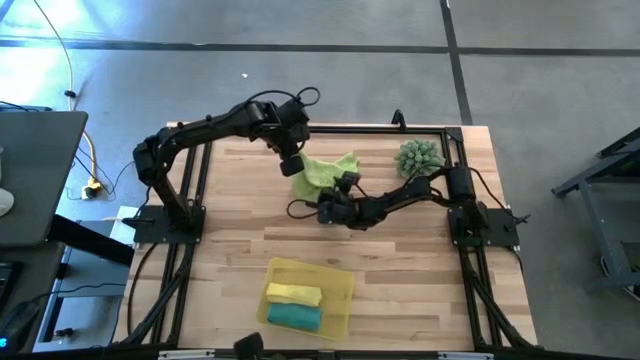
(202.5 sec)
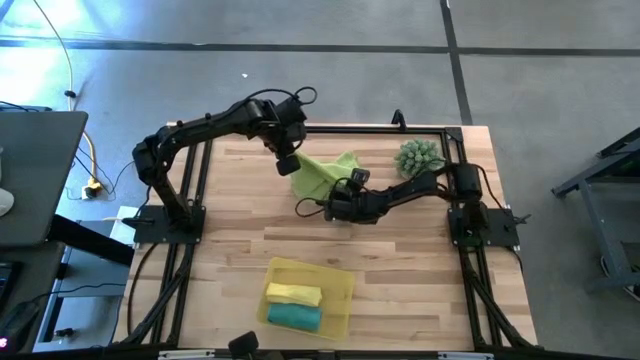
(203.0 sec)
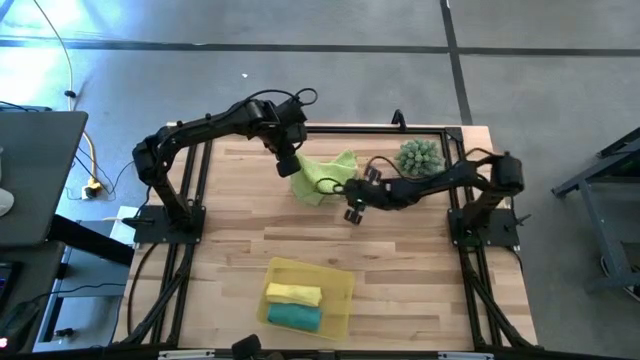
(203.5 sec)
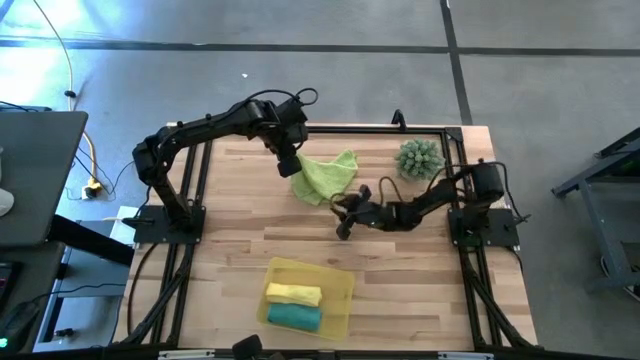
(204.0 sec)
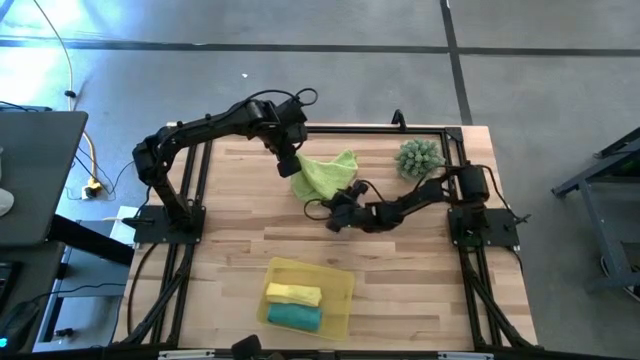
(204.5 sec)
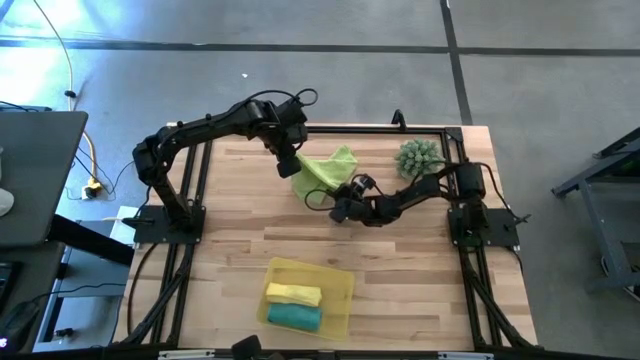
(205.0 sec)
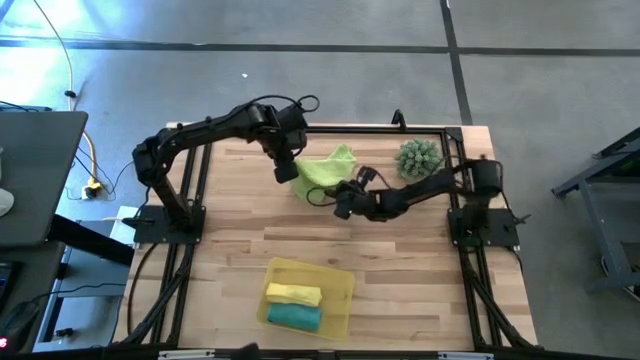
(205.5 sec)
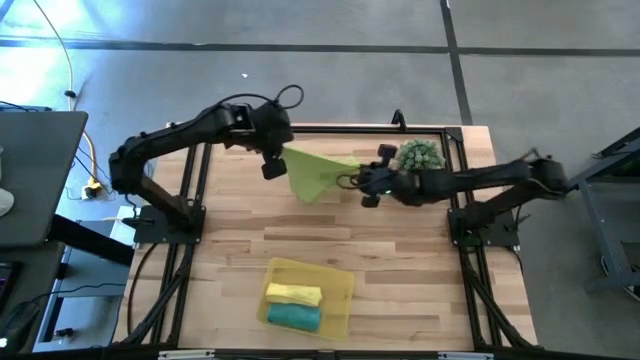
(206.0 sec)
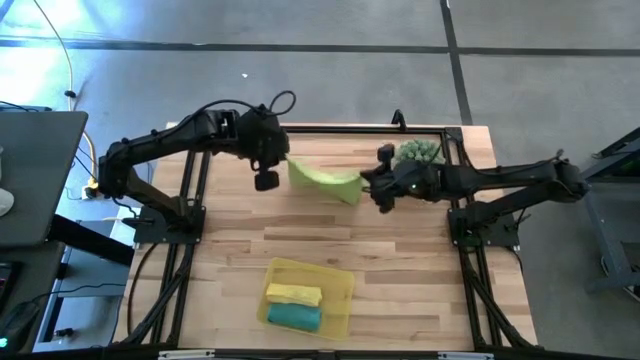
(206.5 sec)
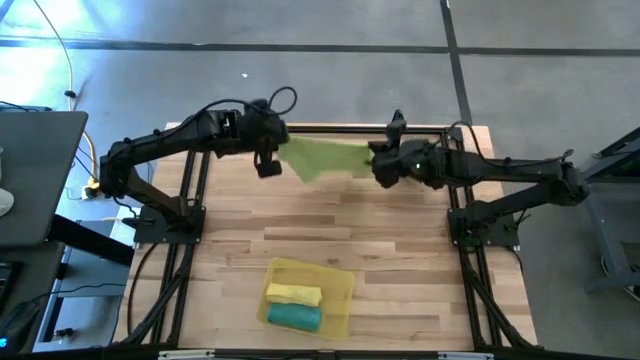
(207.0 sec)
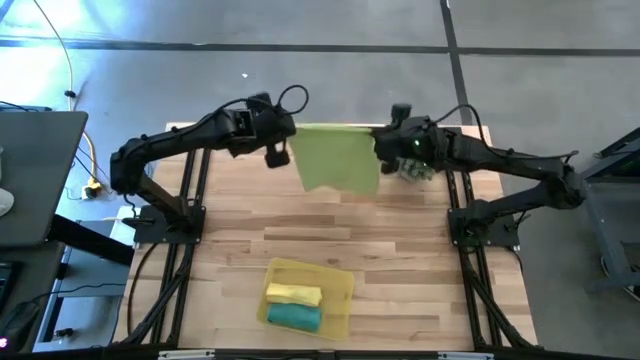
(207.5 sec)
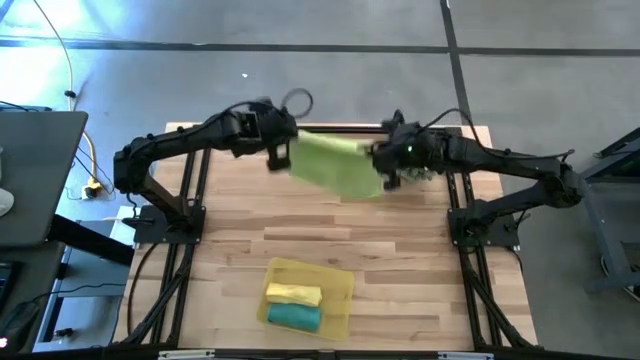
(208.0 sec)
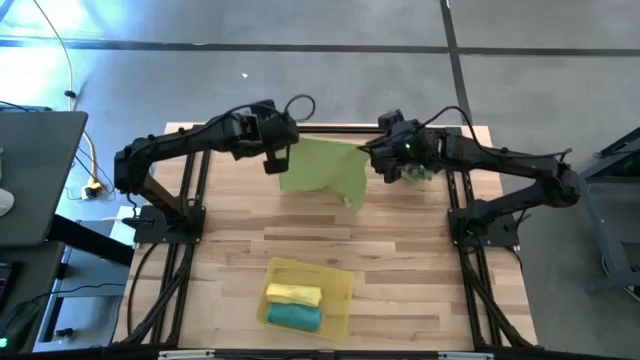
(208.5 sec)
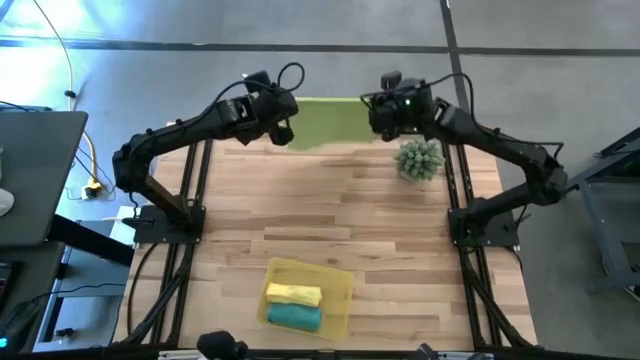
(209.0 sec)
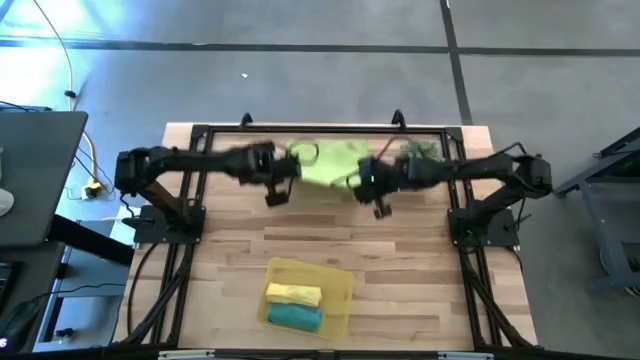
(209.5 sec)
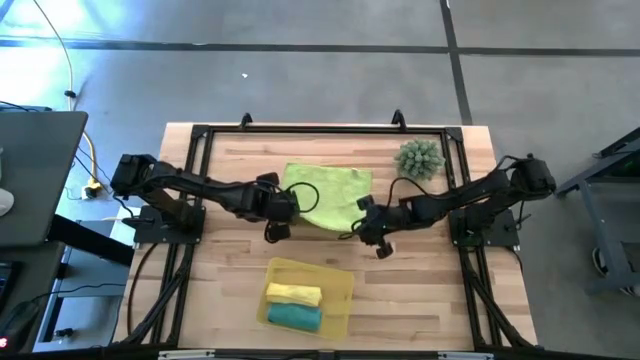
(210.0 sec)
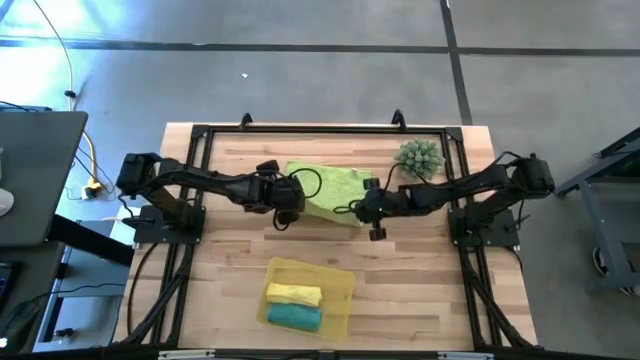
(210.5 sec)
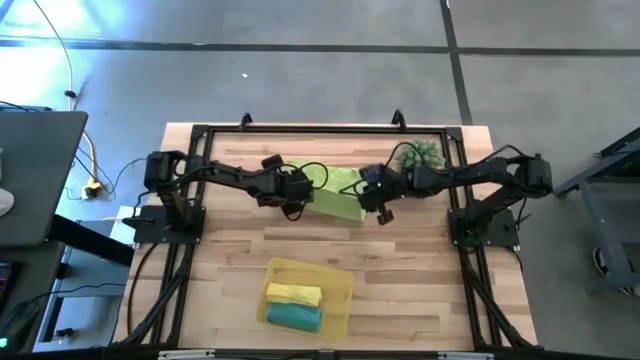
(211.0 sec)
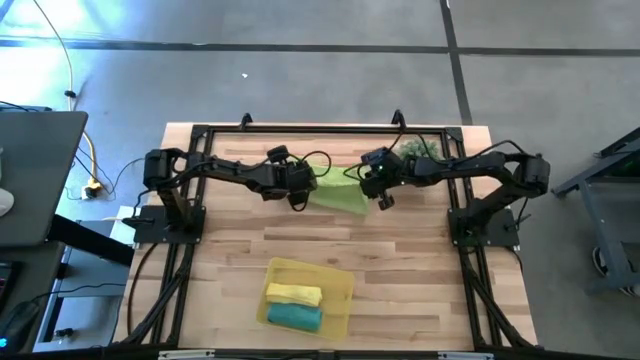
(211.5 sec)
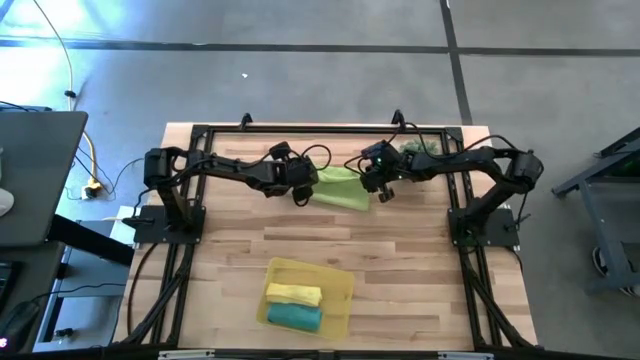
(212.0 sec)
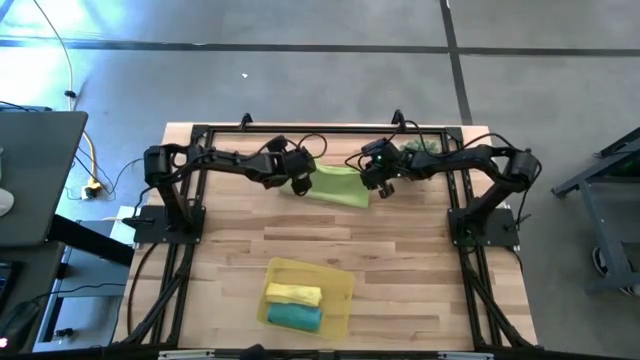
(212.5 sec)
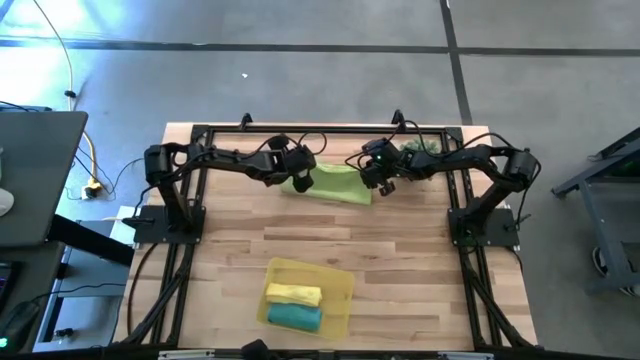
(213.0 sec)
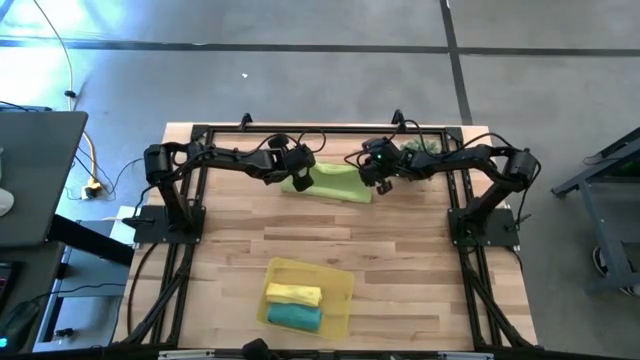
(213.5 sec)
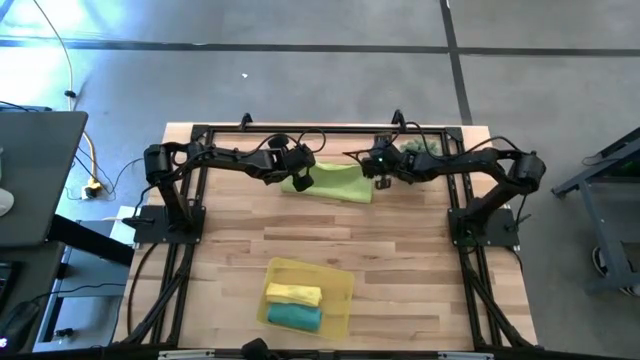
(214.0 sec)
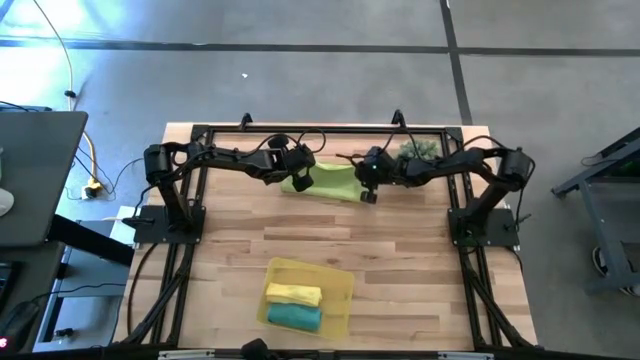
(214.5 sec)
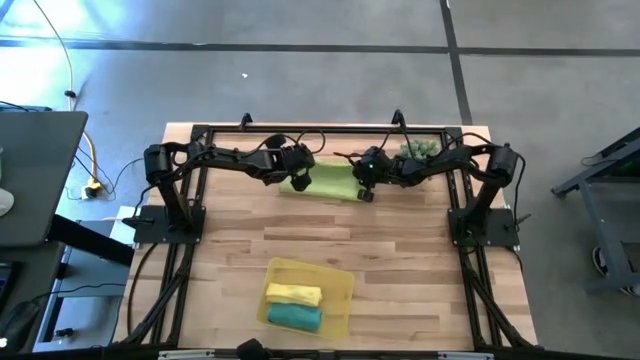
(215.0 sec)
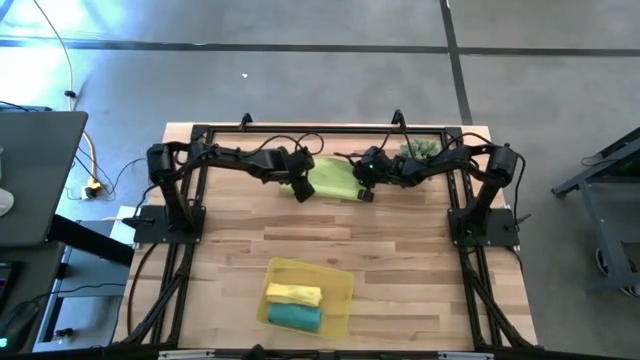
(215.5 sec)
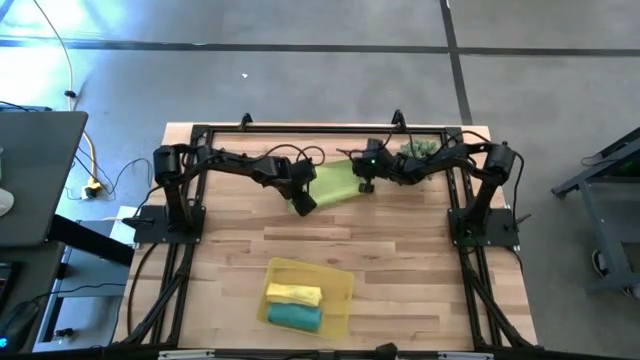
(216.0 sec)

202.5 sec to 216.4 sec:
Task: Roll microfiber towels into tight, uniform cylinder then place into a basket
Fold the green towel

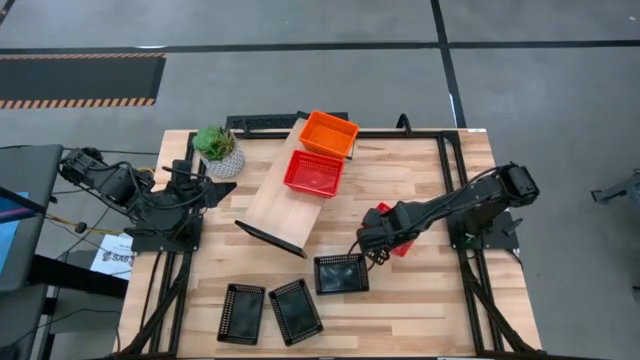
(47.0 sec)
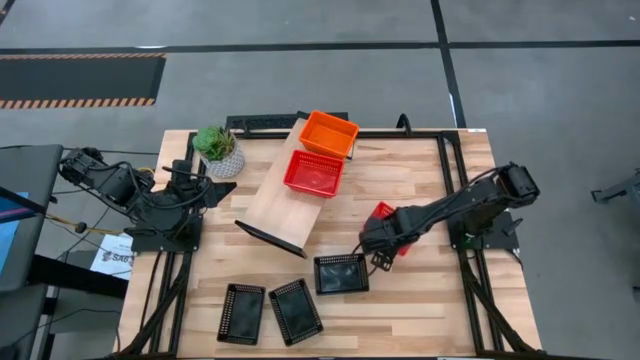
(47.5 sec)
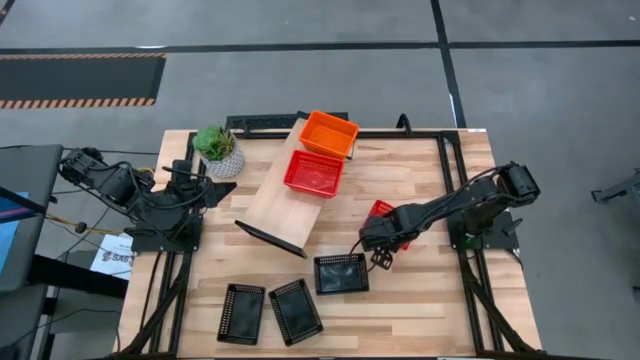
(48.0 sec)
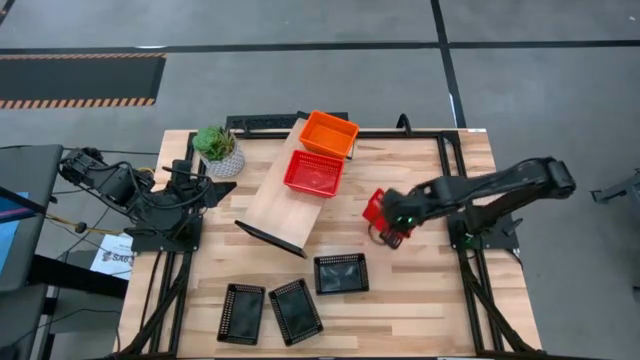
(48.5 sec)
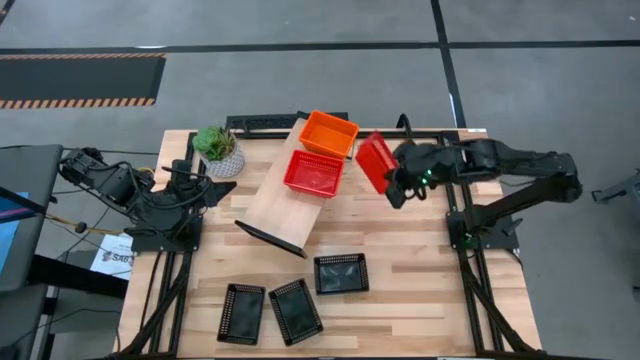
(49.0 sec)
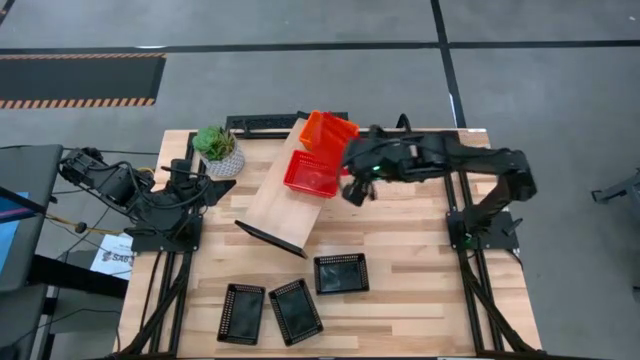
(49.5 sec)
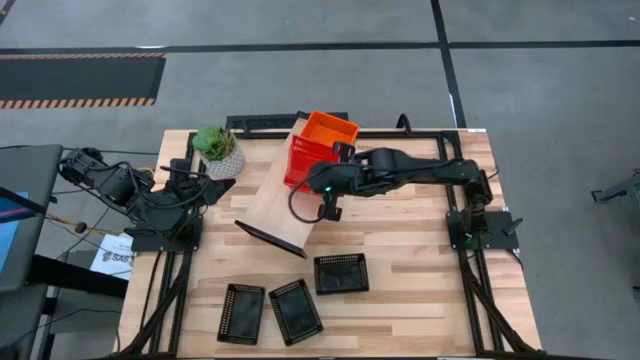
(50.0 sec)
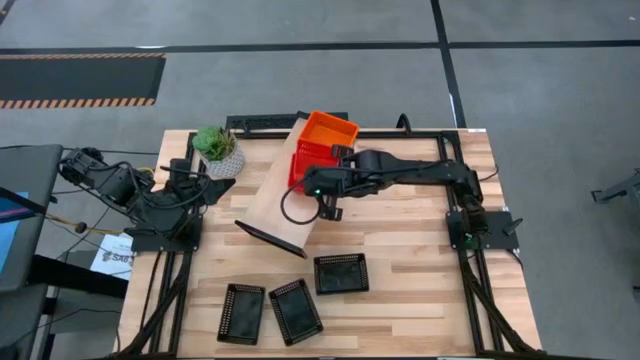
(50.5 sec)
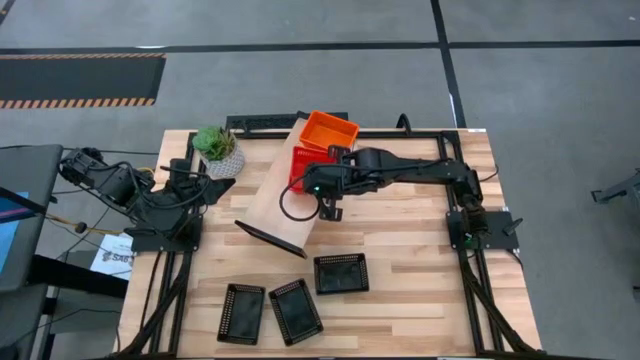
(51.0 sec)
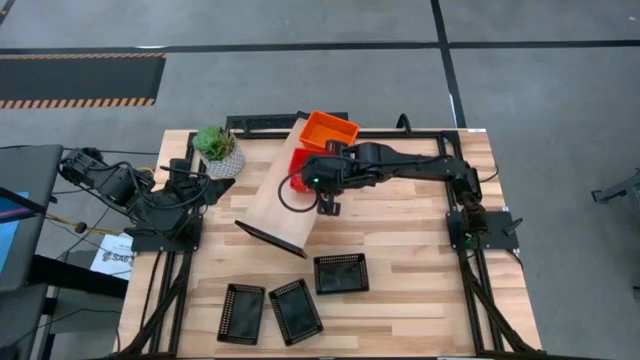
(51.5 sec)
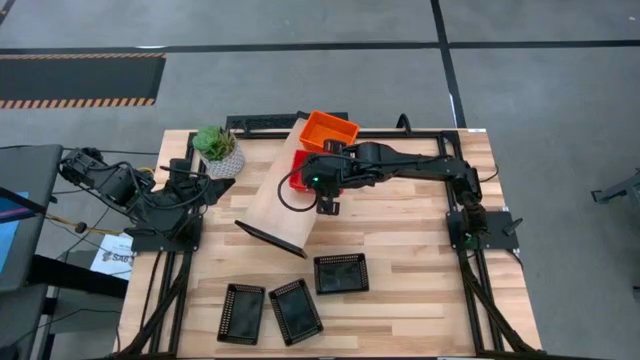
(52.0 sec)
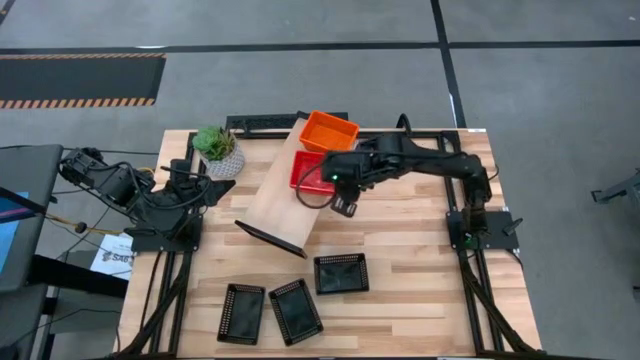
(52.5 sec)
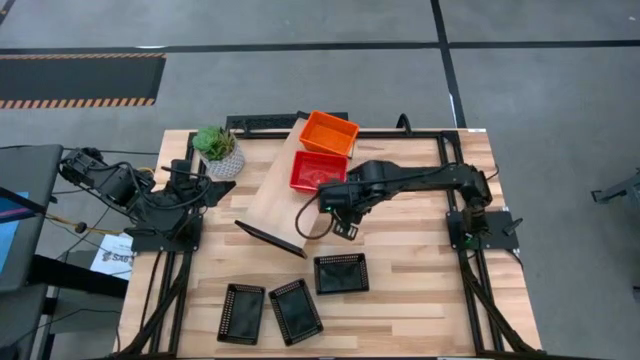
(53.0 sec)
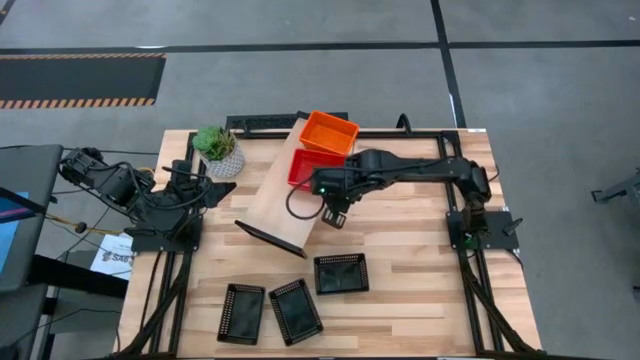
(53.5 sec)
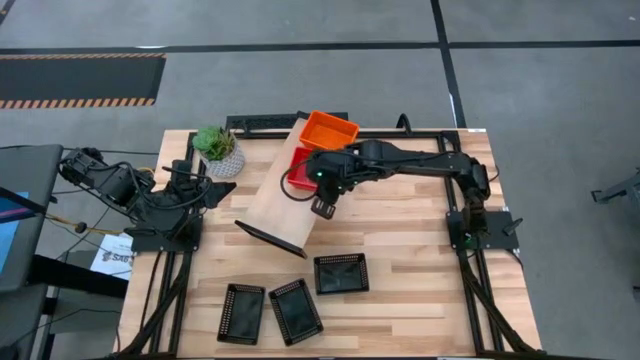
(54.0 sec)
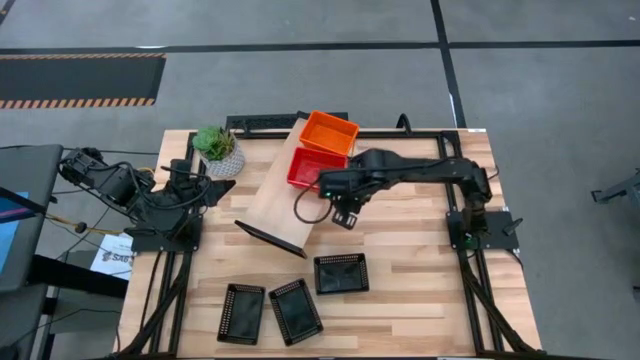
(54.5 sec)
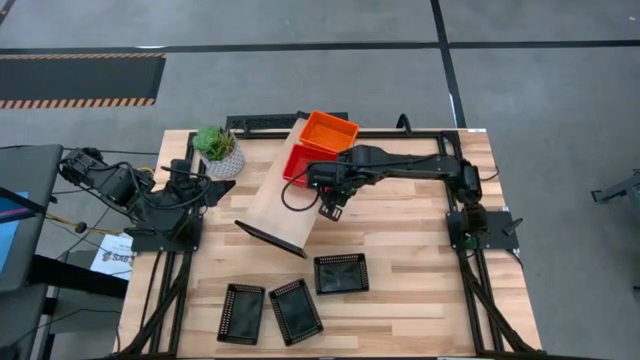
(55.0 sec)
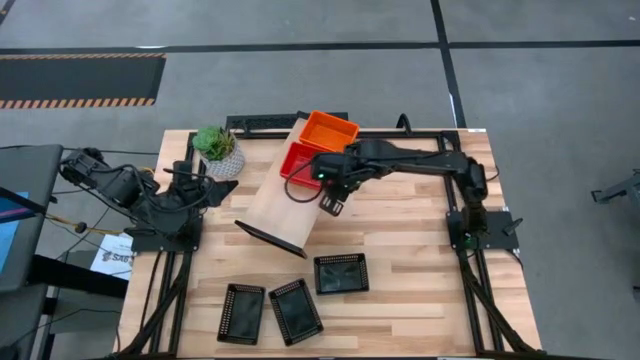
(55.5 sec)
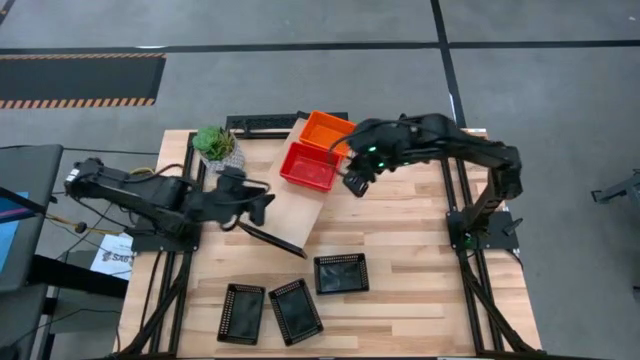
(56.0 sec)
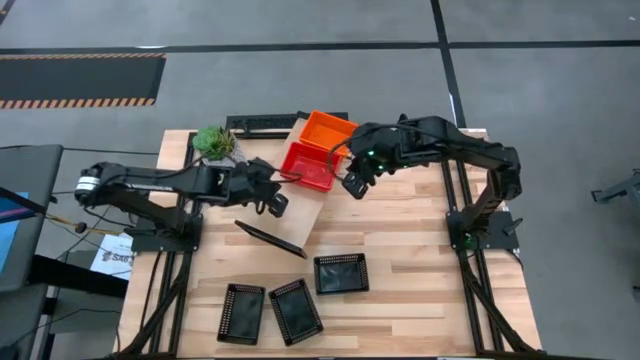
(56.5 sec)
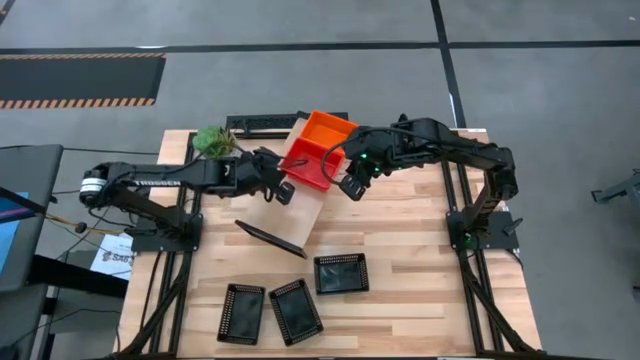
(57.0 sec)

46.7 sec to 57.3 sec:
Task: Stack baskets on shelf by color
Stack the red bin on top of the stacked red bins on the shelf
